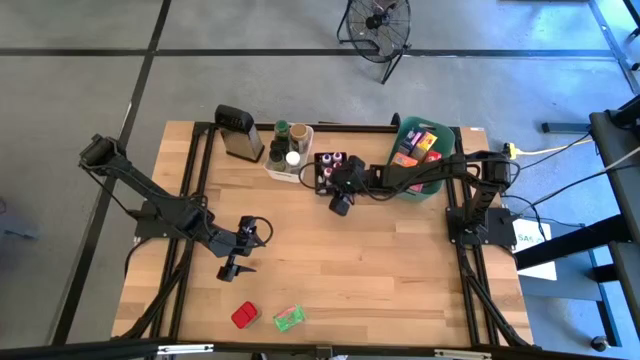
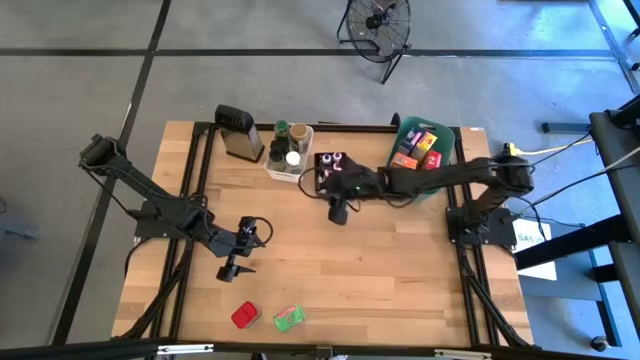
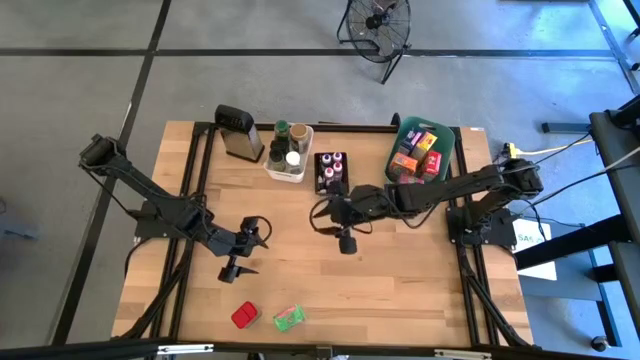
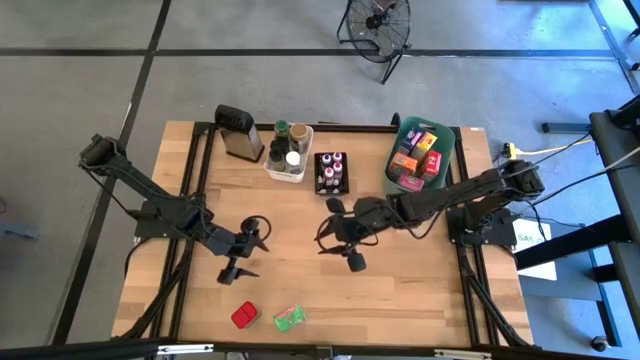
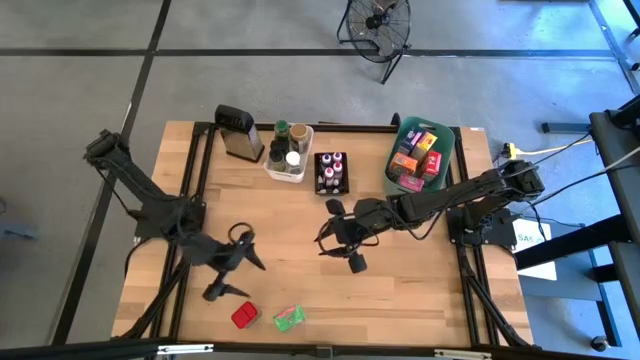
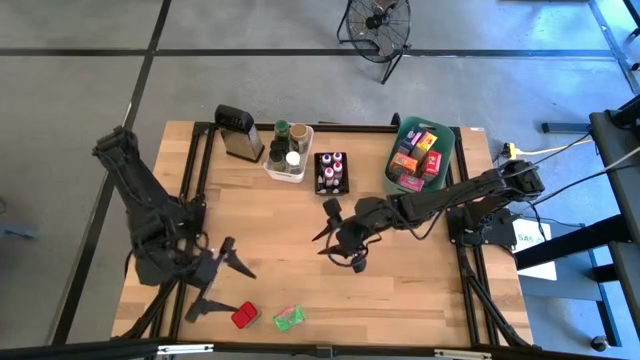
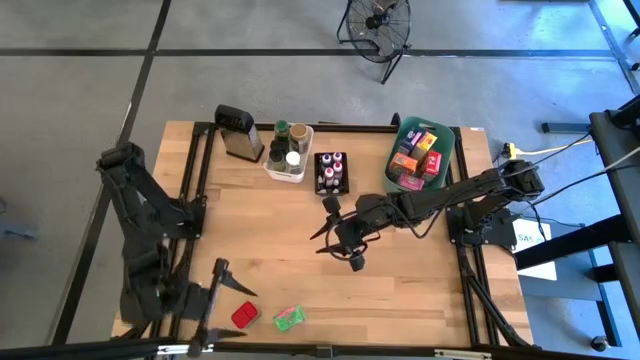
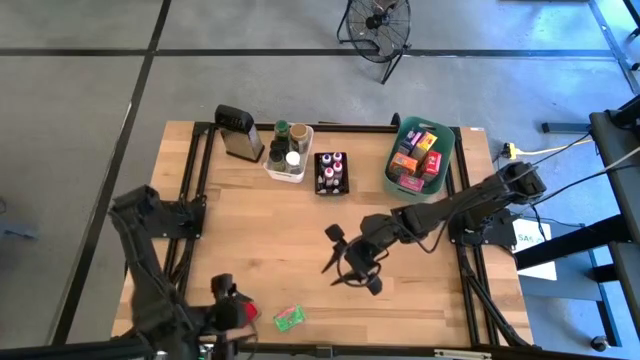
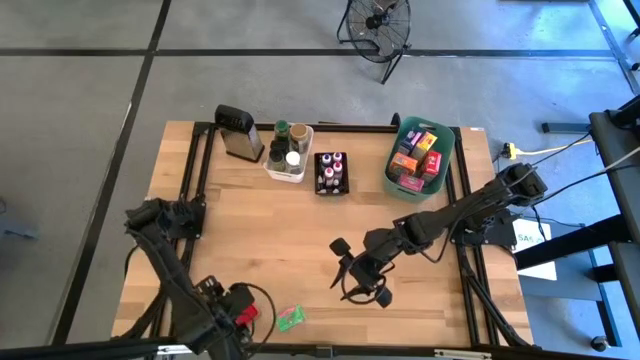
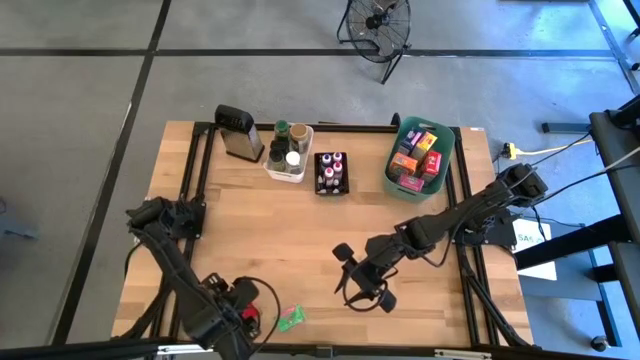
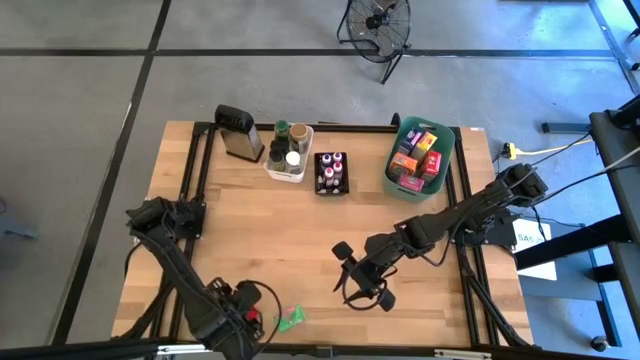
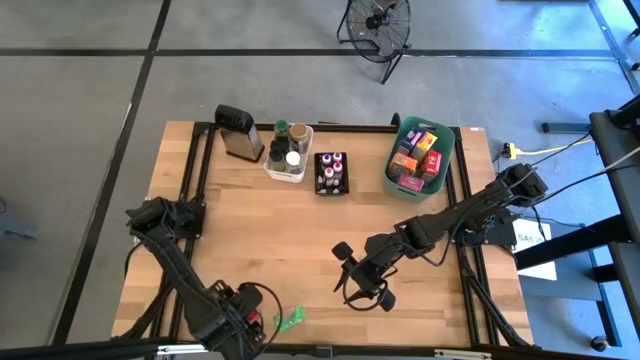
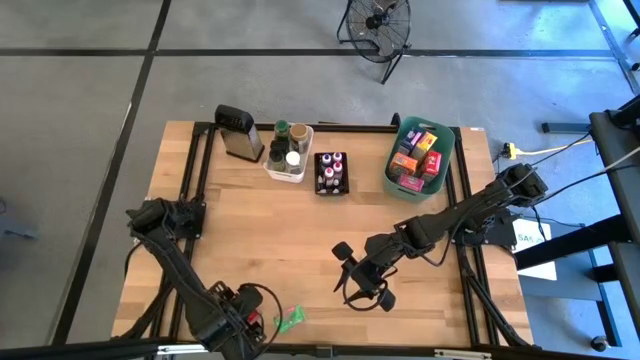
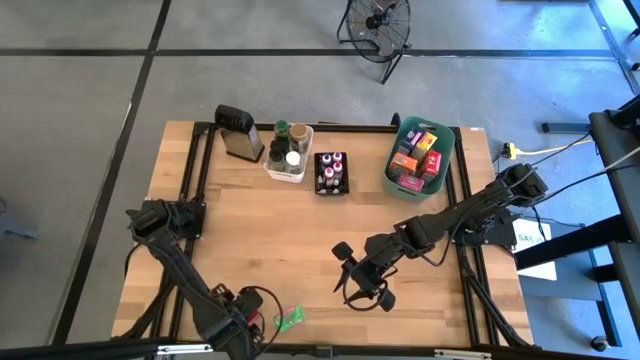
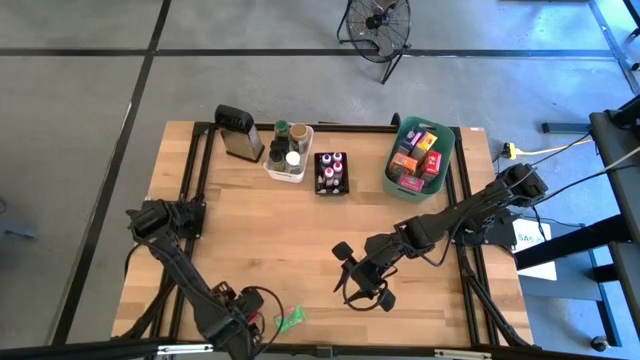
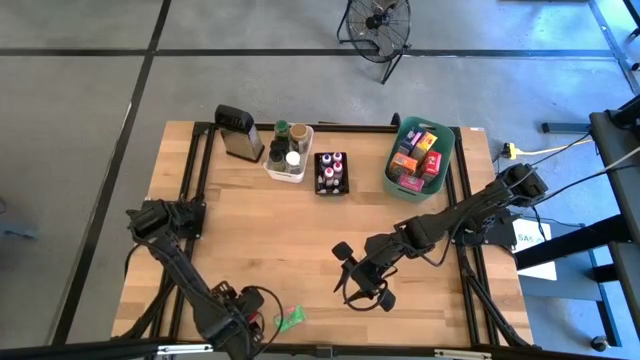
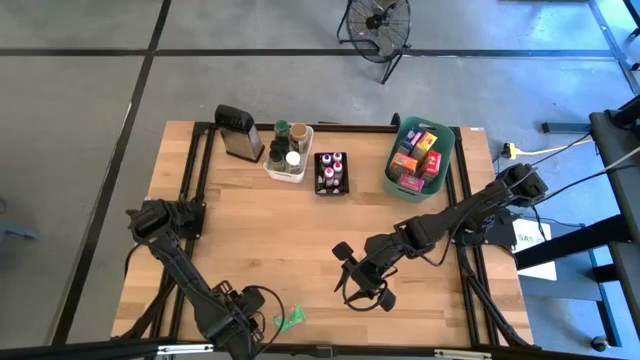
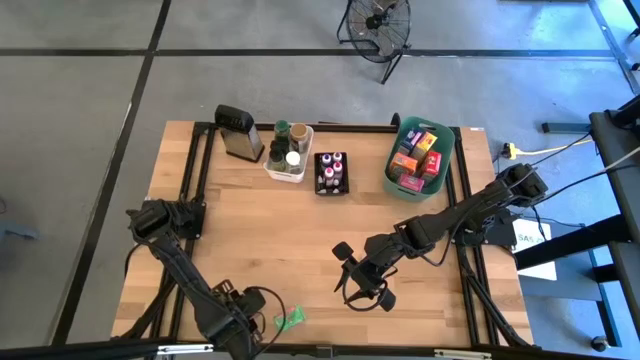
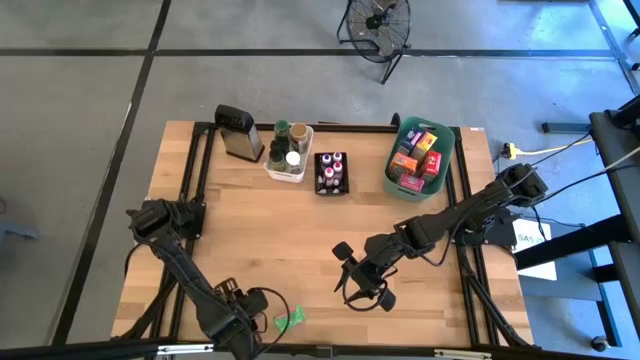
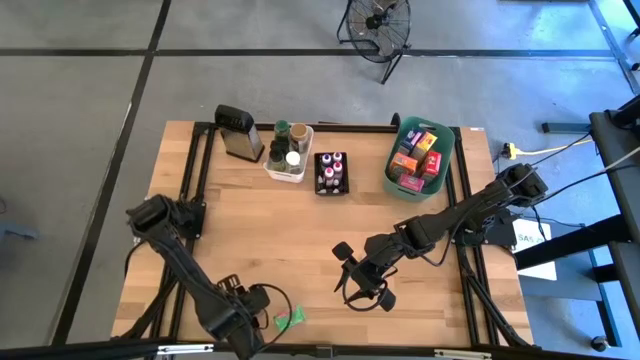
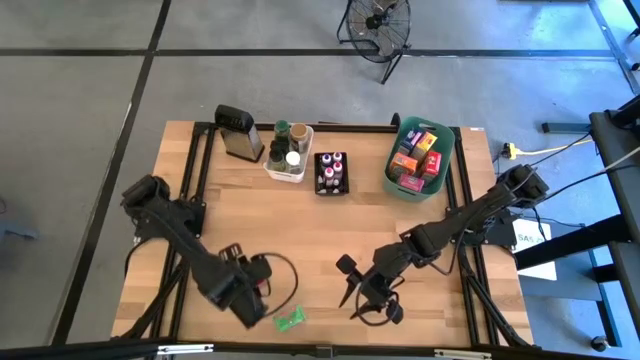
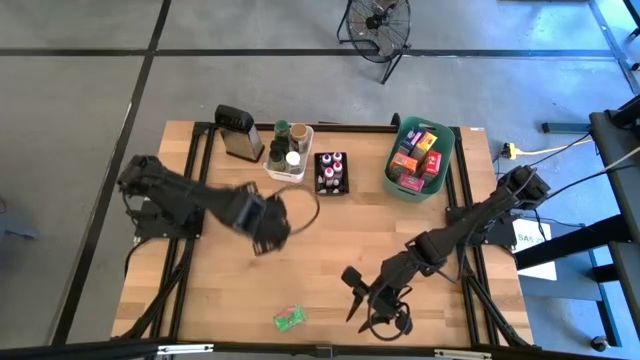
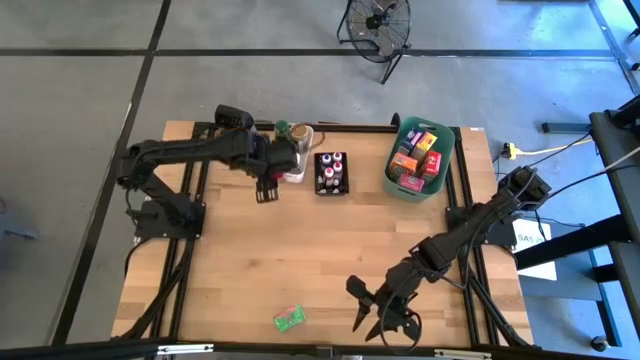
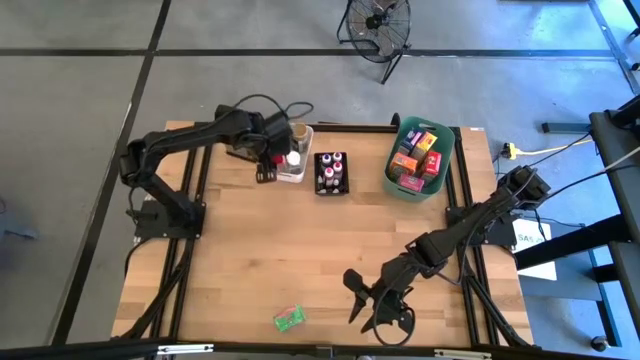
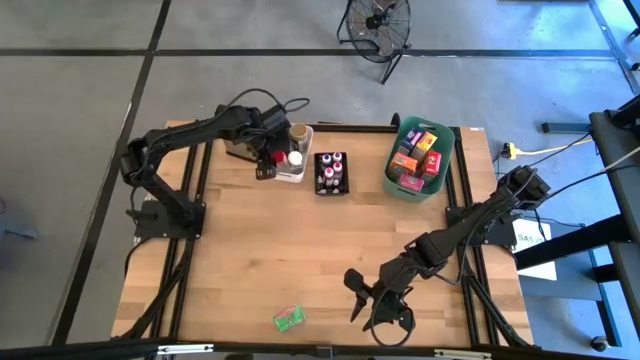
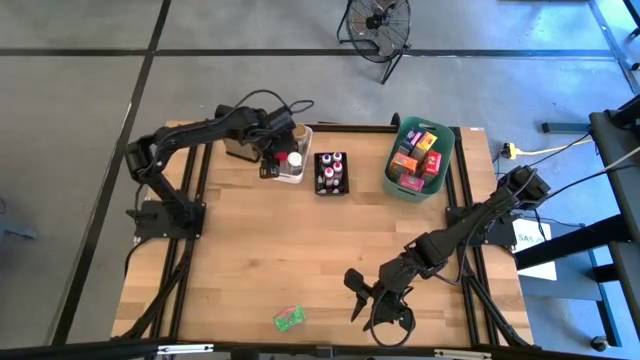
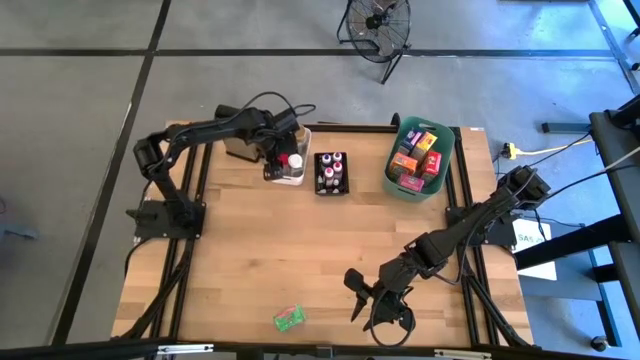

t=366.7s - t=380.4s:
Task: Pick & Place Kitchen Items
Put the red seasoning can into the white bin

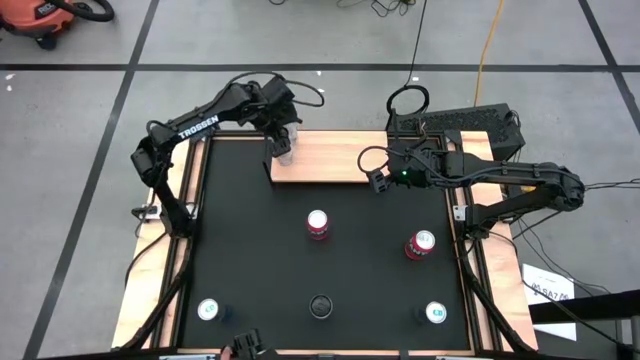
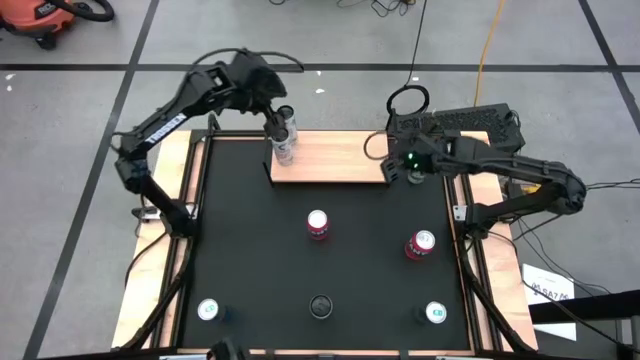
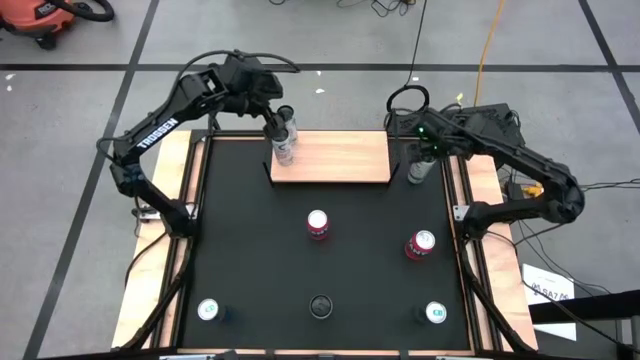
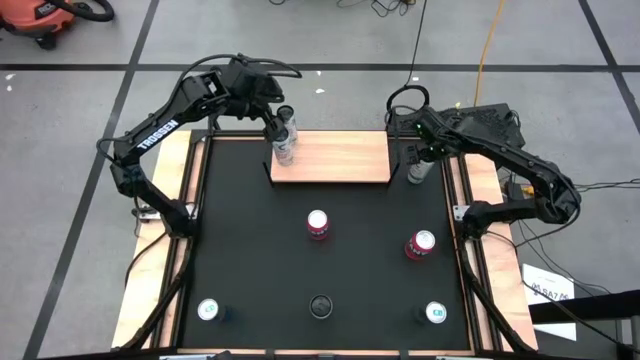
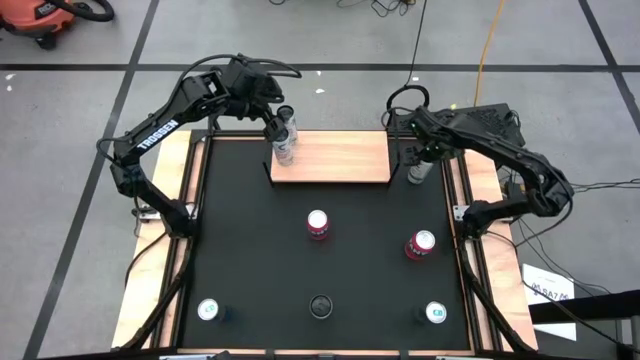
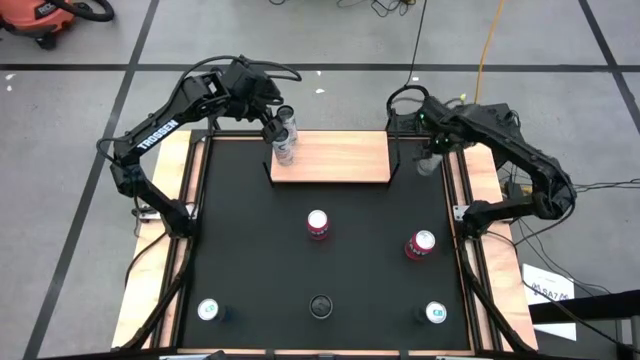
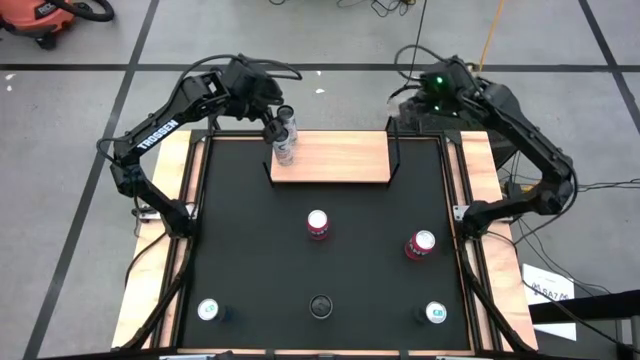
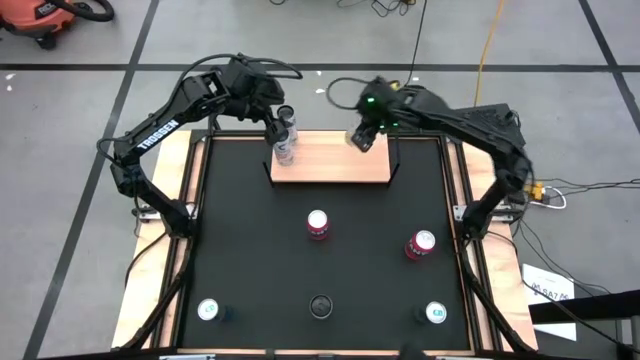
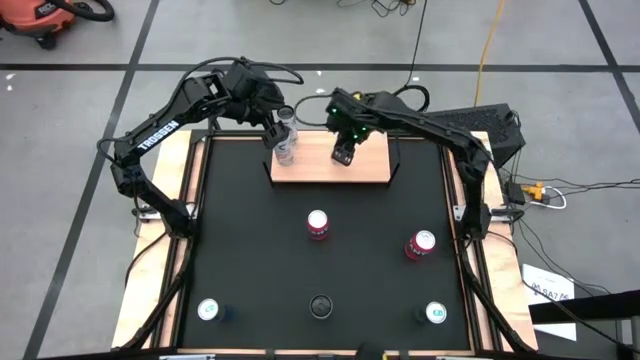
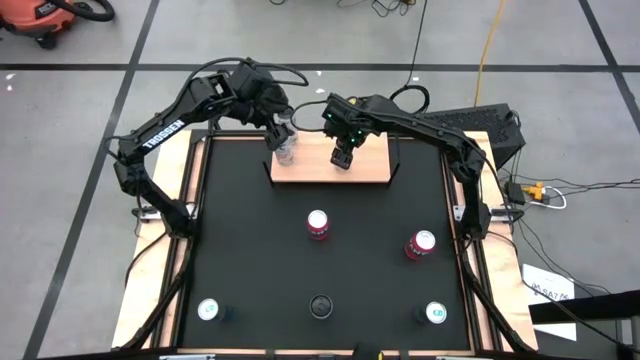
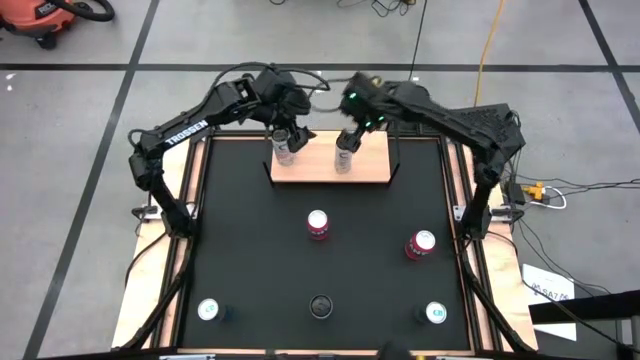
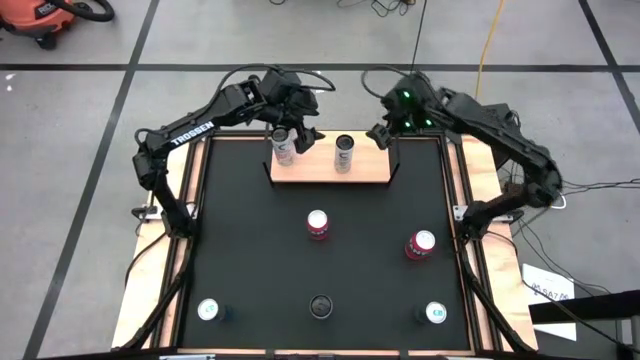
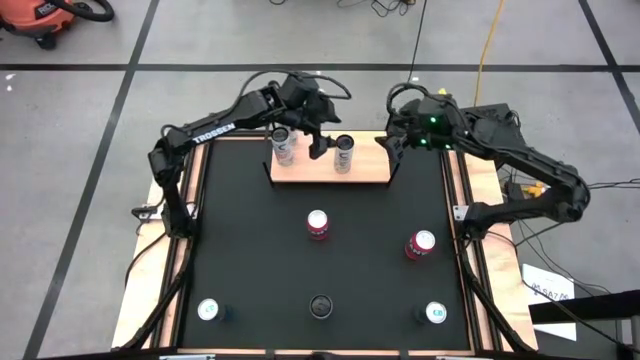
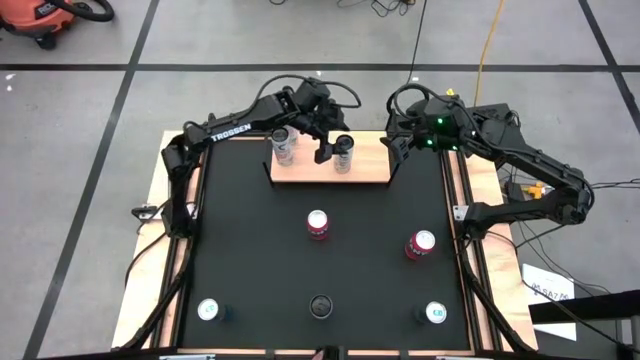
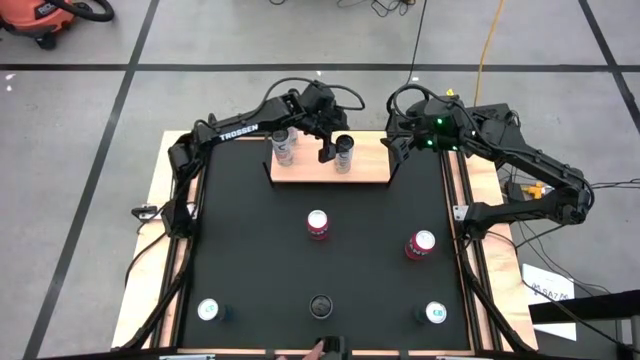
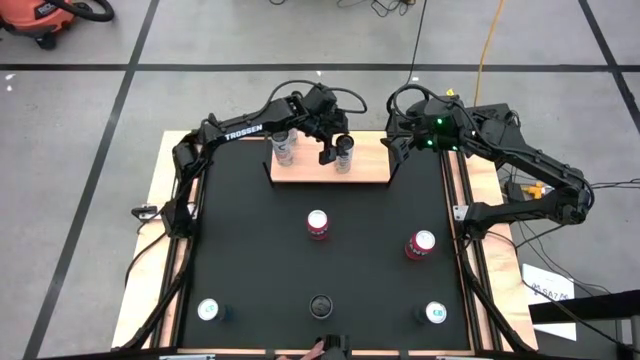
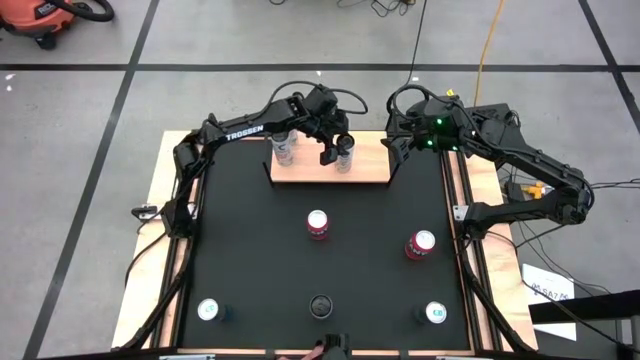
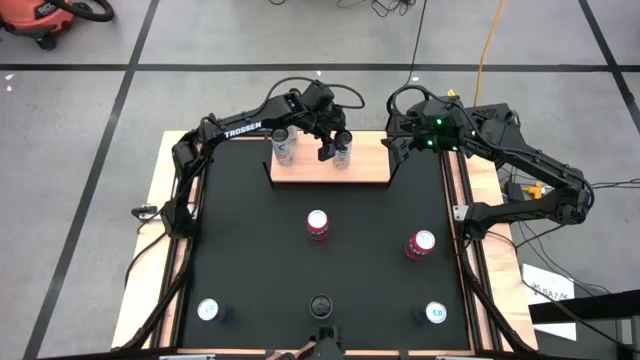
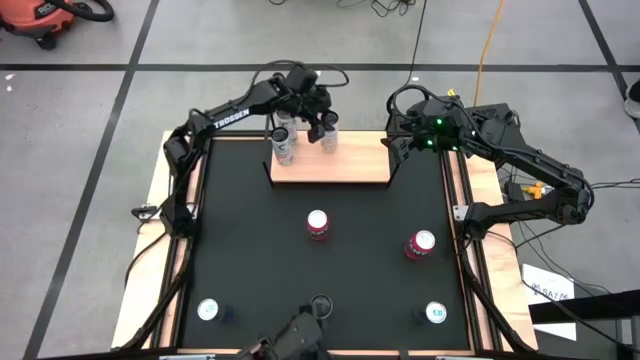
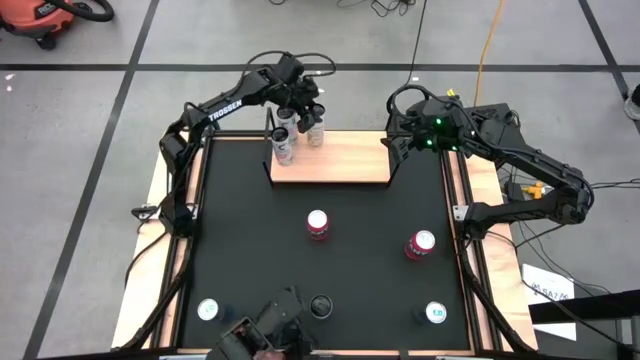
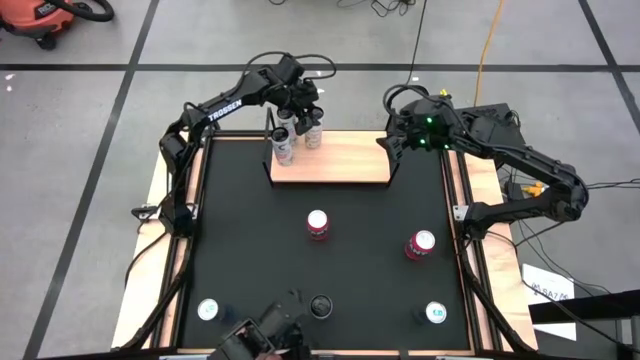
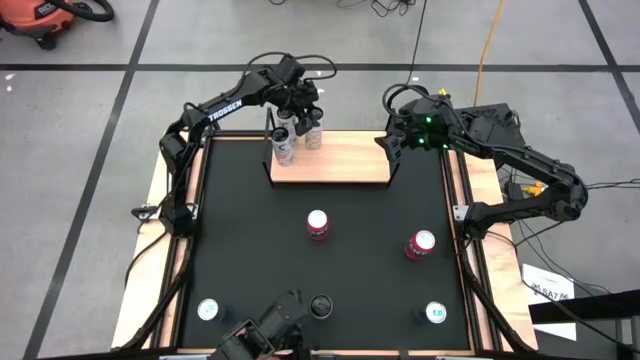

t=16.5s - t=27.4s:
Task: Place canned beverage on shelf
Put the top white yellow soda can on the shelf
